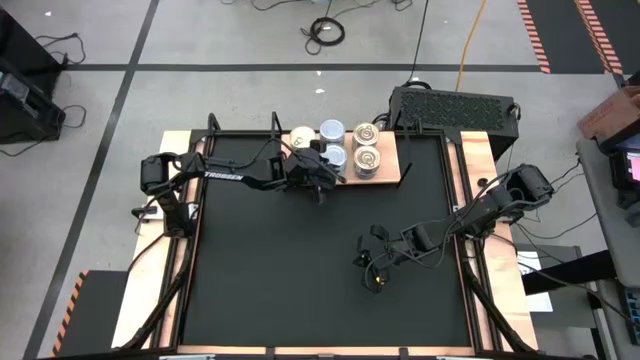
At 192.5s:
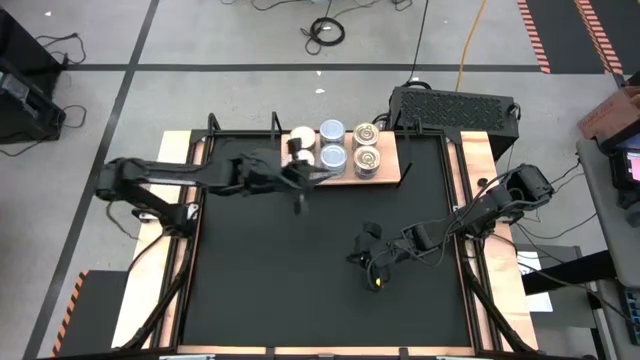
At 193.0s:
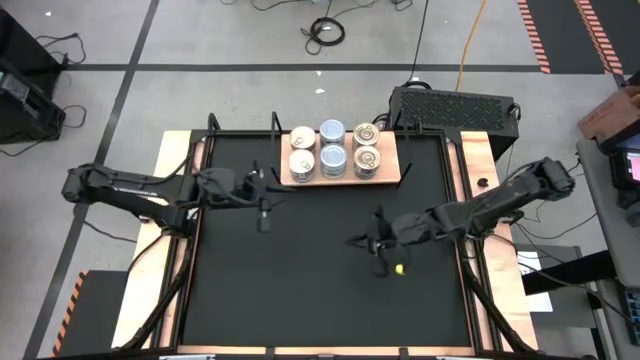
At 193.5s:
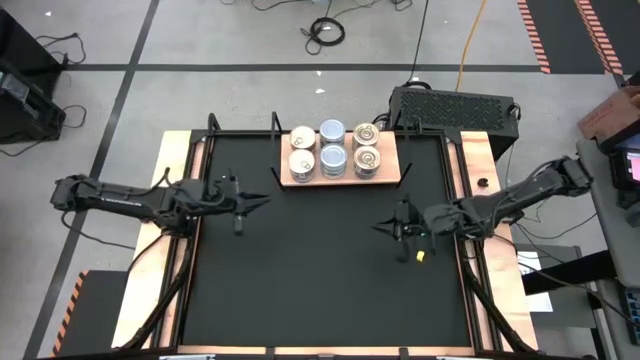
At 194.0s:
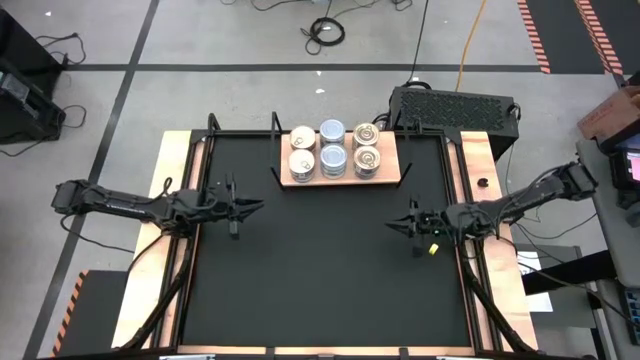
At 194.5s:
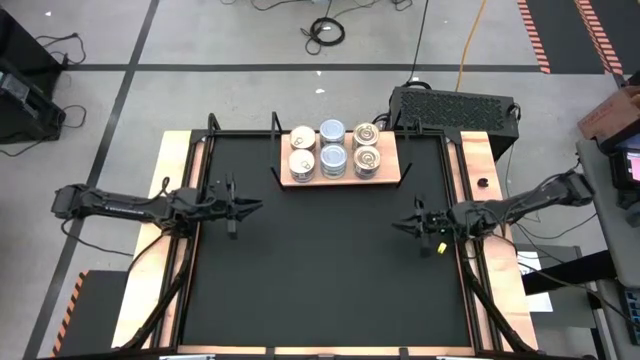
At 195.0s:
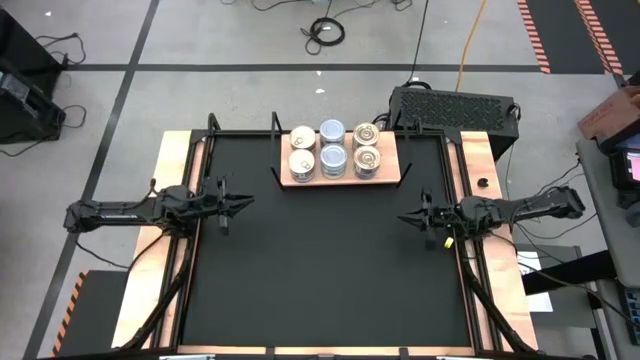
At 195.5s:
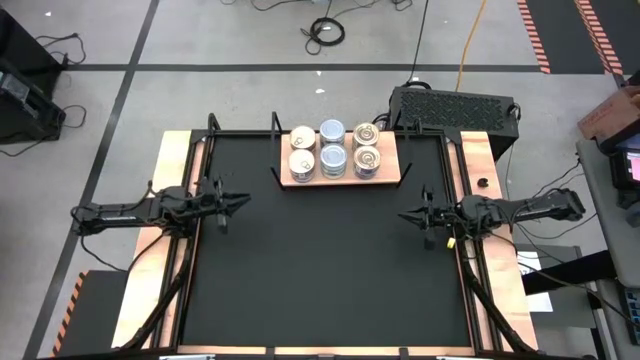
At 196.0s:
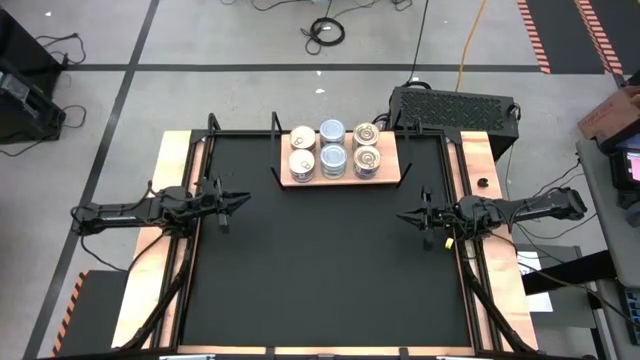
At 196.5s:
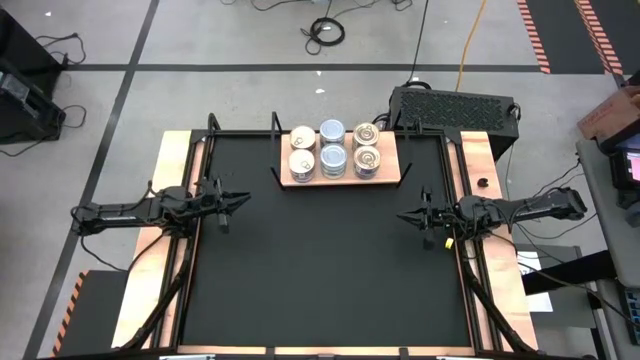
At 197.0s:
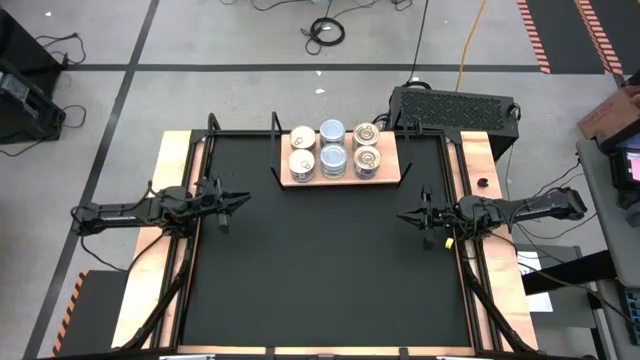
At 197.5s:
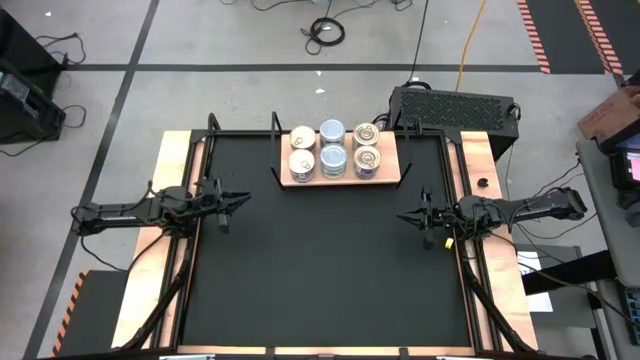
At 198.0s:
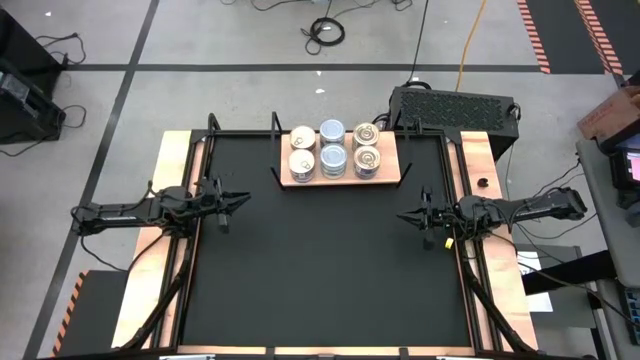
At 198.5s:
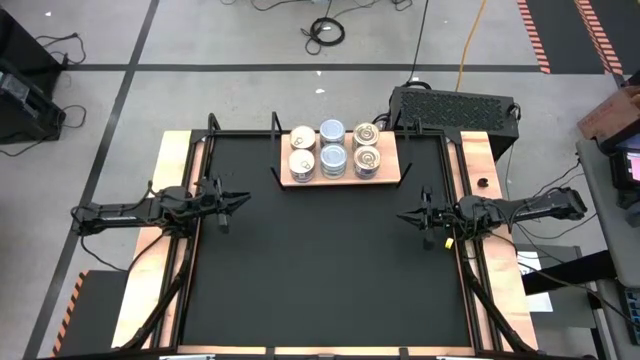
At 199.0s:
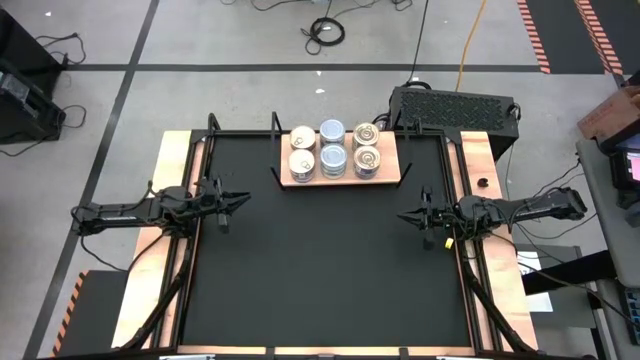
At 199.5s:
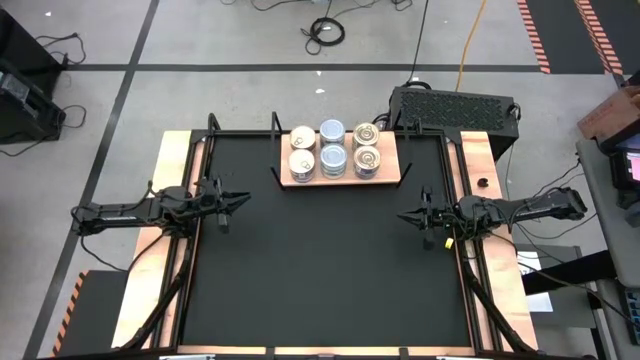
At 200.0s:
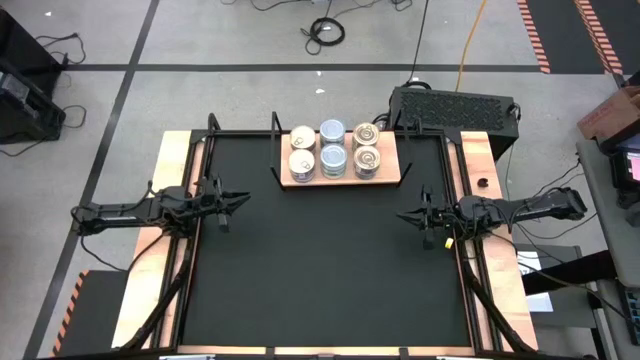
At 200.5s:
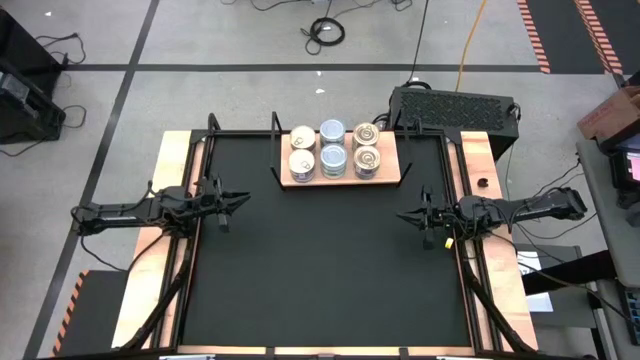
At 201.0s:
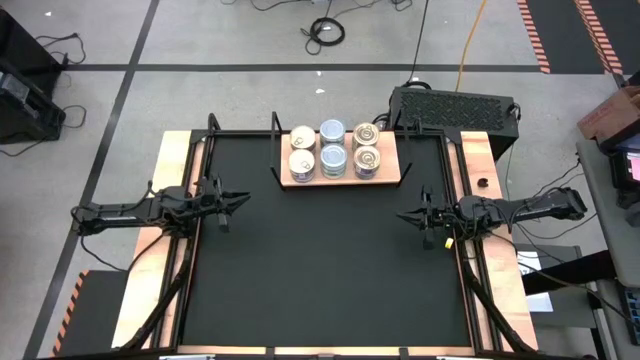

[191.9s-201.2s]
Task: Stack canned seafood by type on shelf
Return to Home Position

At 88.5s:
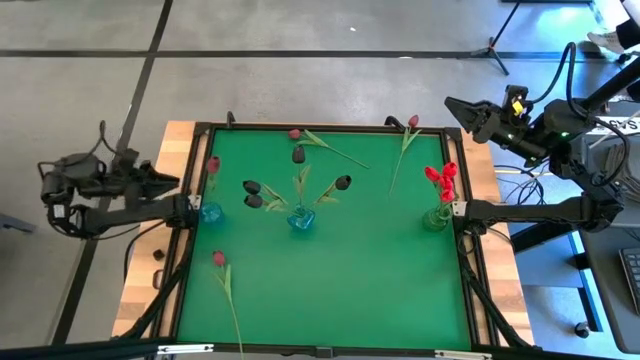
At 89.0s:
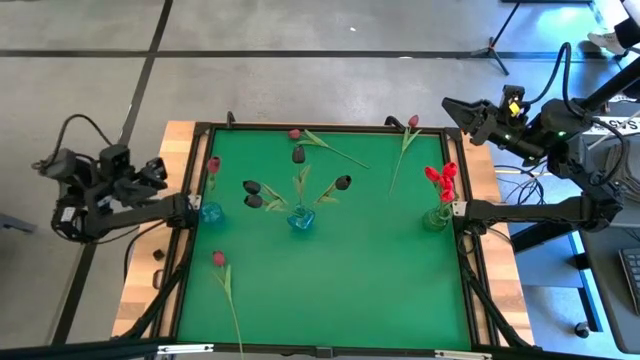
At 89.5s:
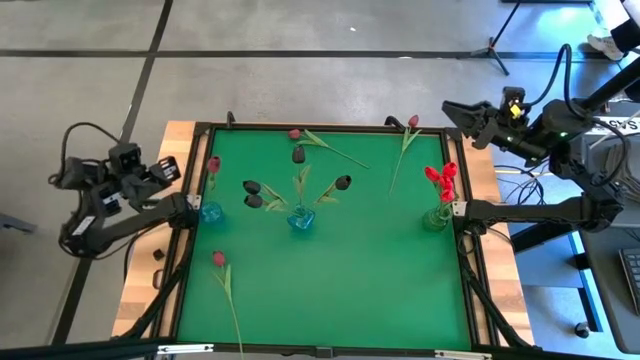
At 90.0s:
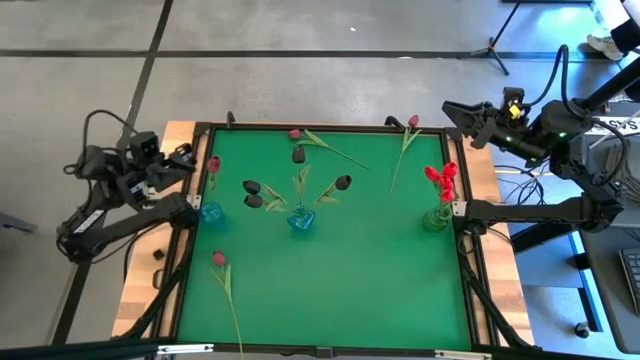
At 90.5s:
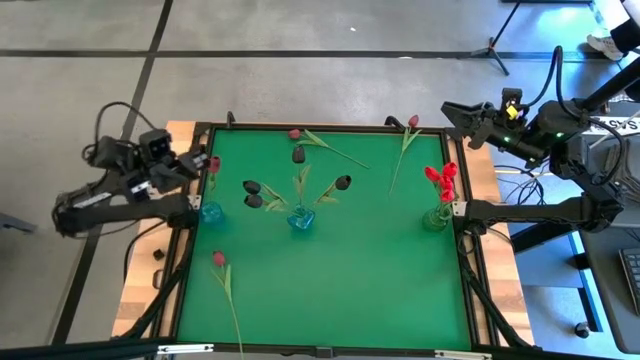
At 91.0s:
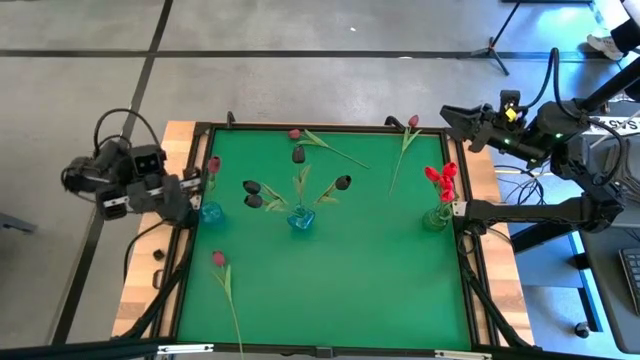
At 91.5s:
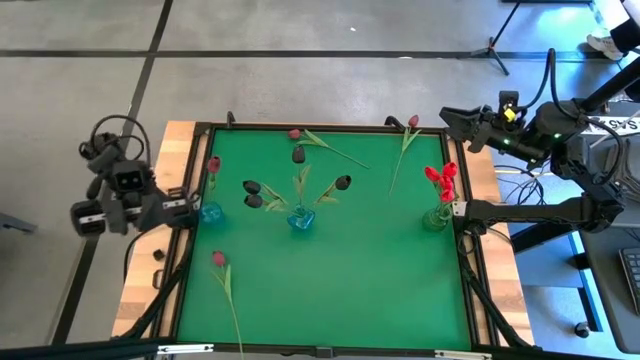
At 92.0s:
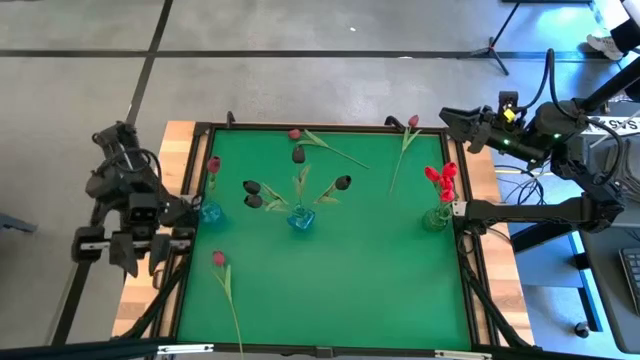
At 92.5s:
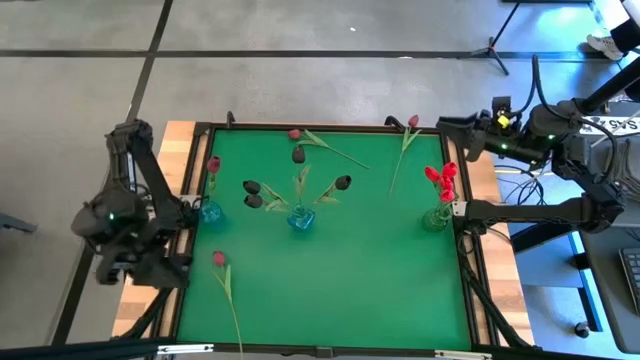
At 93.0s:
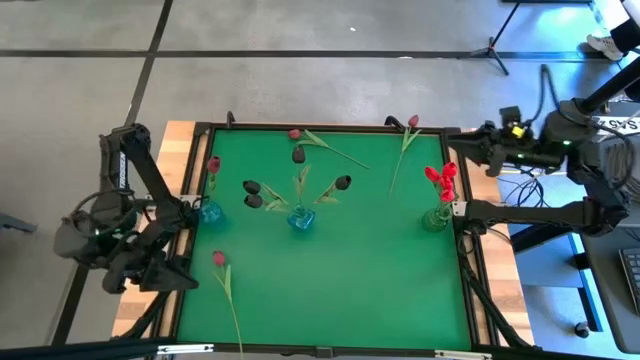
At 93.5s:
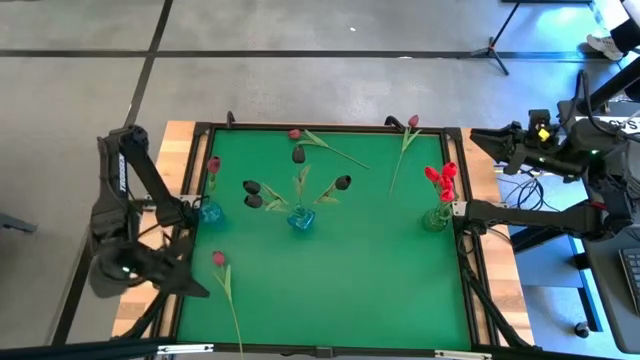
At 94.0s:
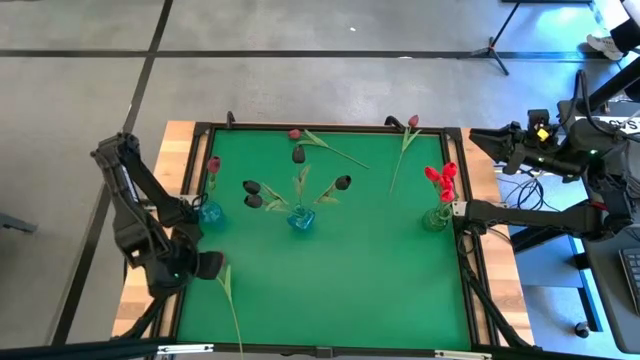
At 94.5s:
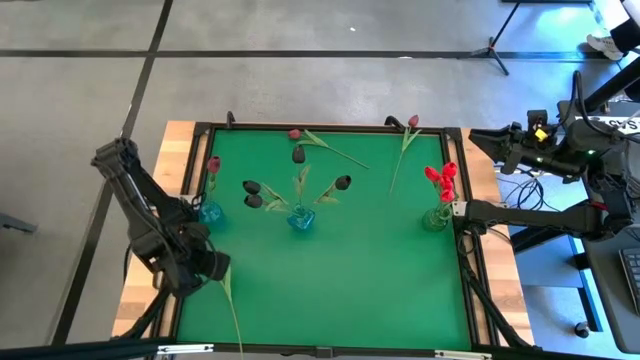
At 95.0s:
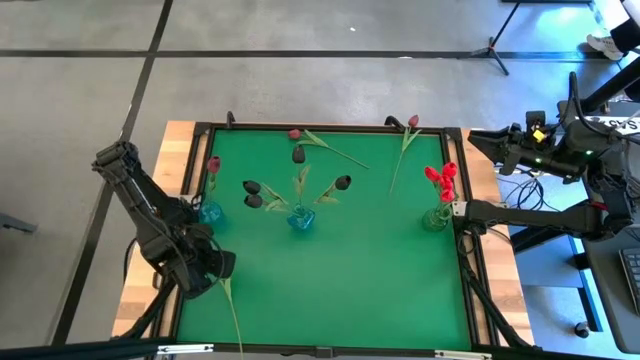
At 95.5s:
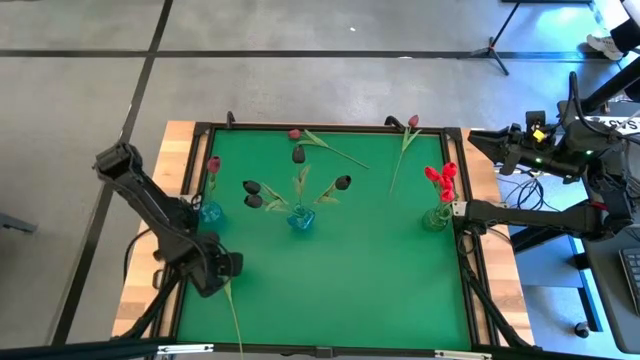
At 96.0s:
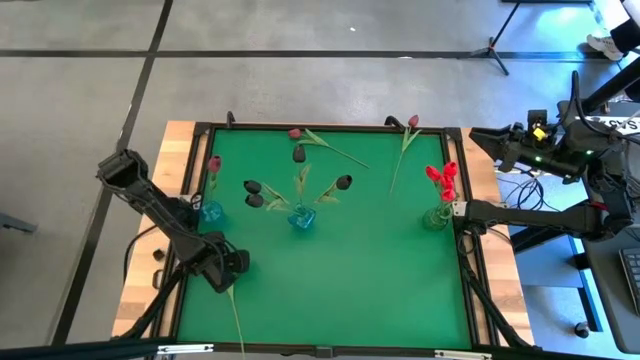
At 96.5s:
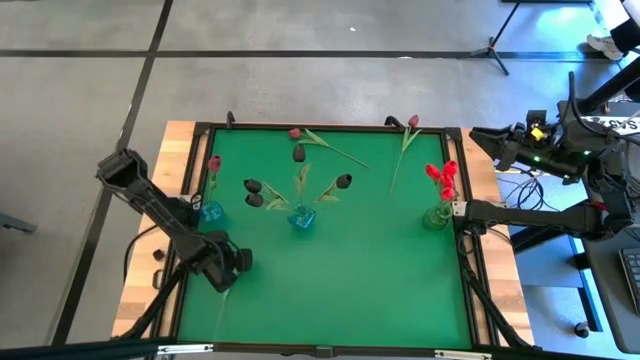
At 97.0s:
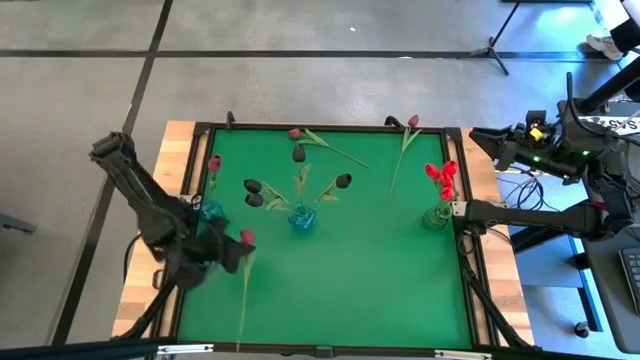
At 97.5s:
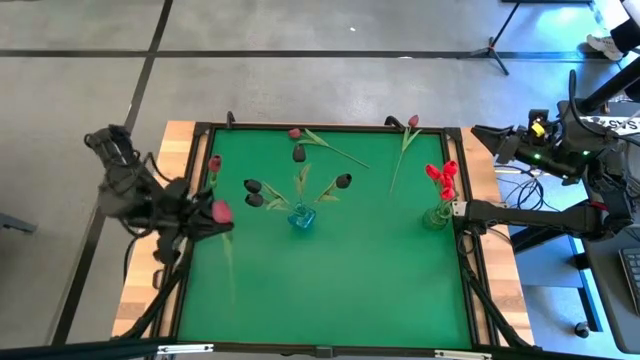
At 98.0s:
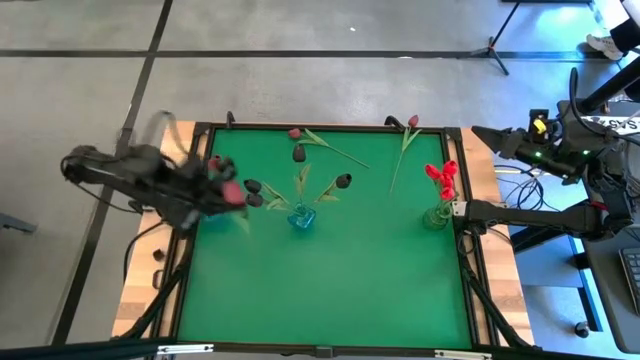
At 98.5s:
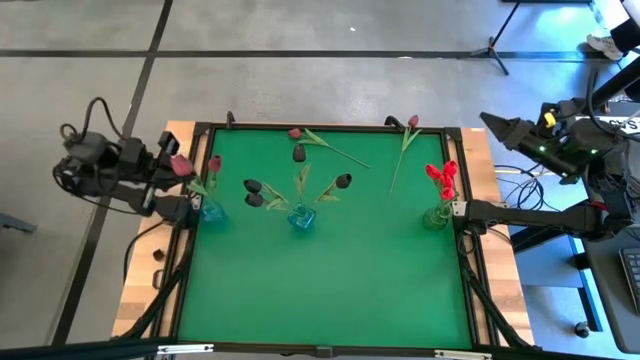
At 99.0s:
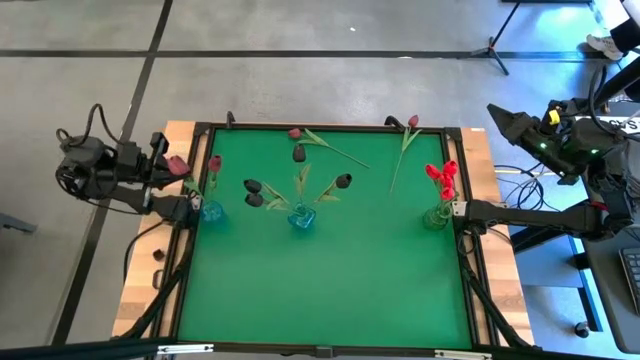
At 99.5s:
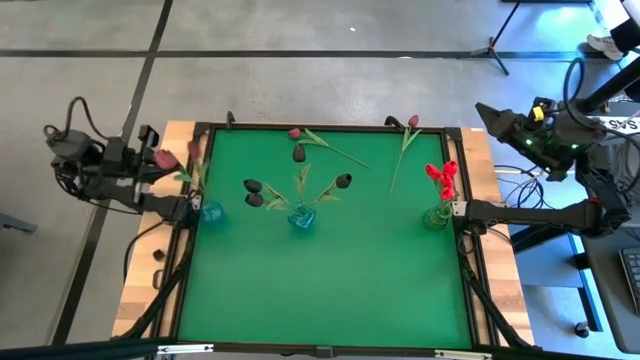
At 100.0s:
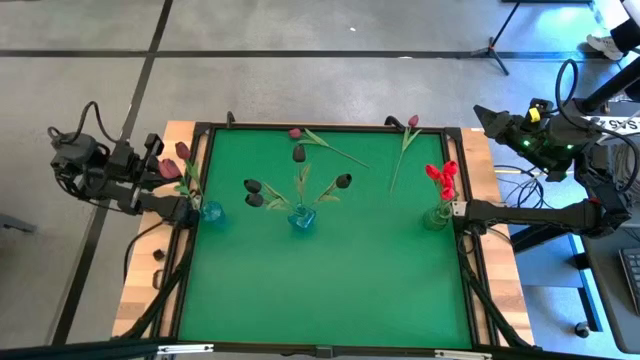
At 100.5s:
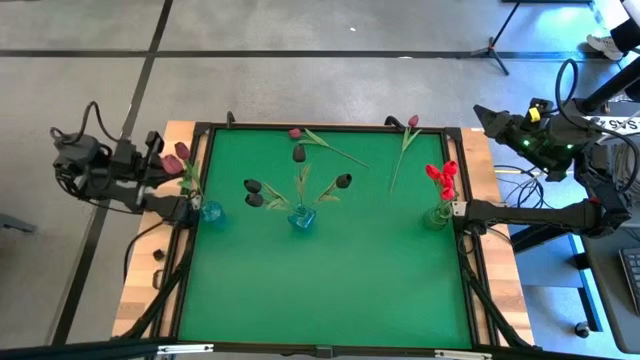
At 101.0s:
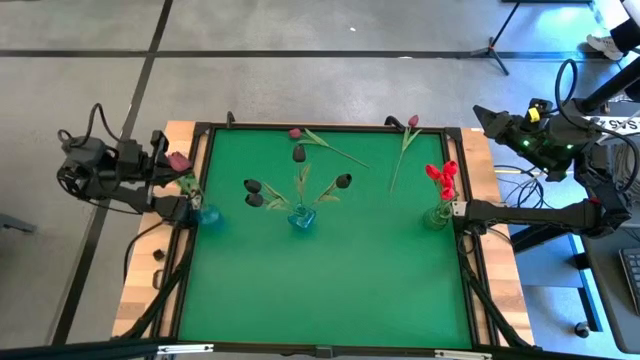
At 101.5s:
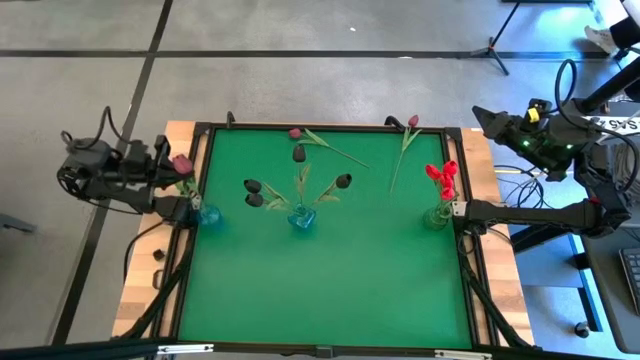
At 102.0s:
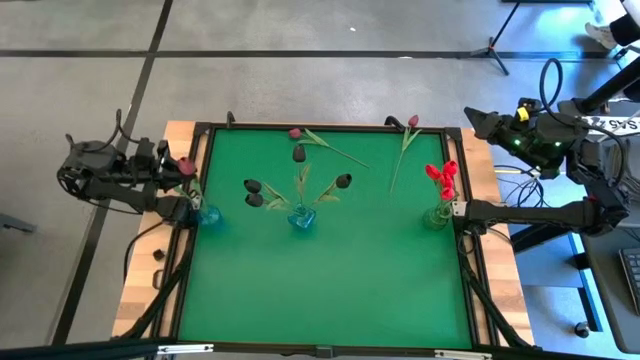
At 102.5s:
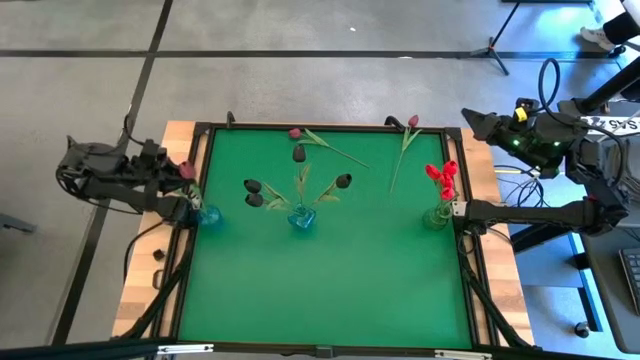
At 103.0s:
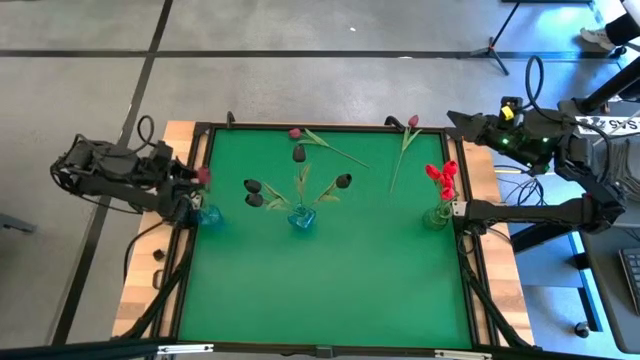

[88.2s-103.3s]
Task: Sort flowers into vase by color
Put the bottom pink tulip into the left blue vase
